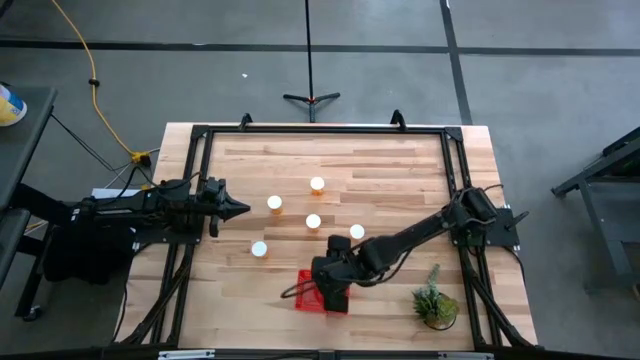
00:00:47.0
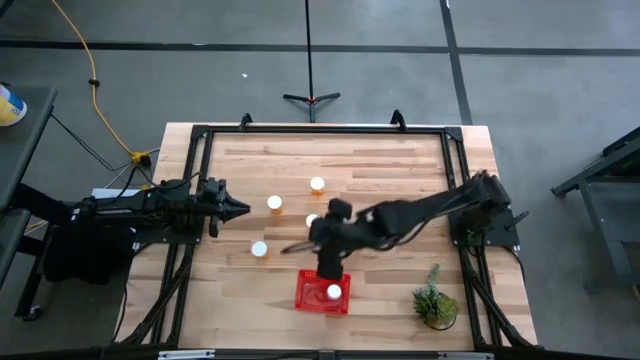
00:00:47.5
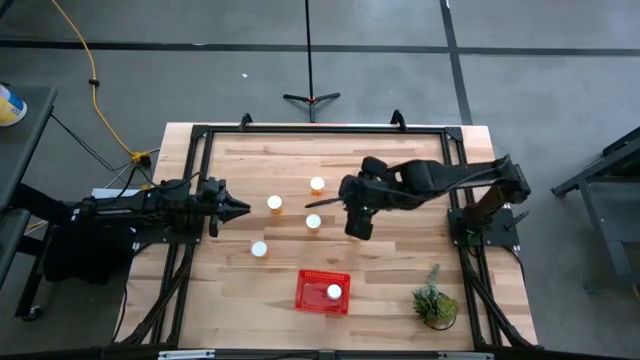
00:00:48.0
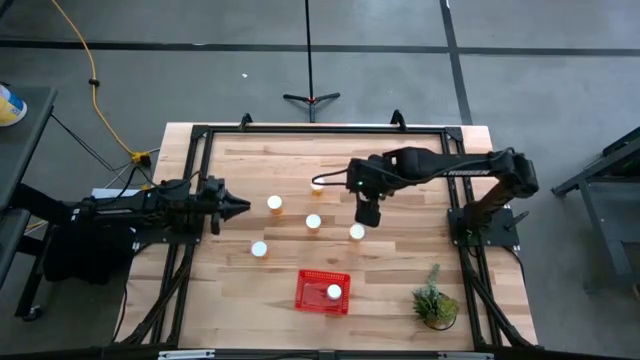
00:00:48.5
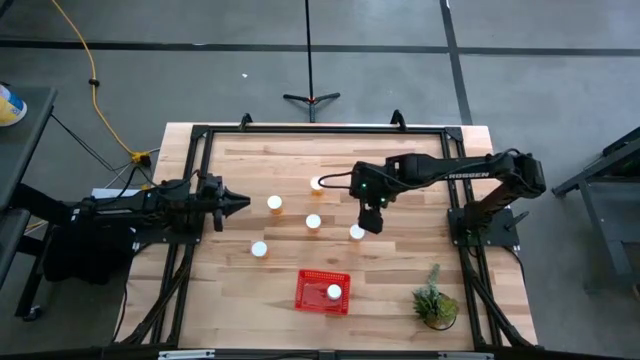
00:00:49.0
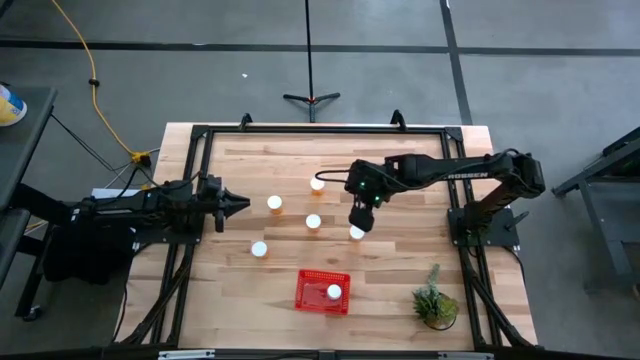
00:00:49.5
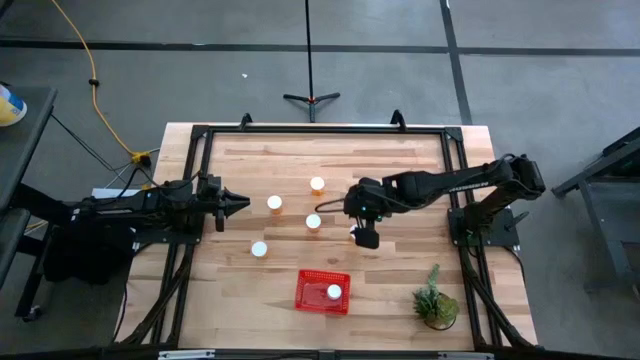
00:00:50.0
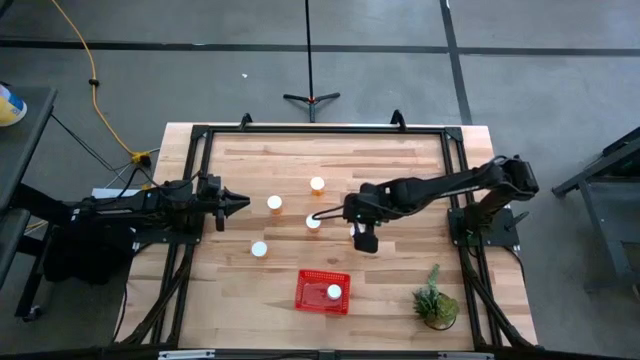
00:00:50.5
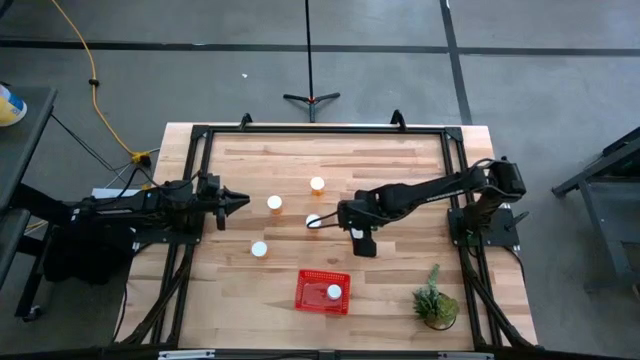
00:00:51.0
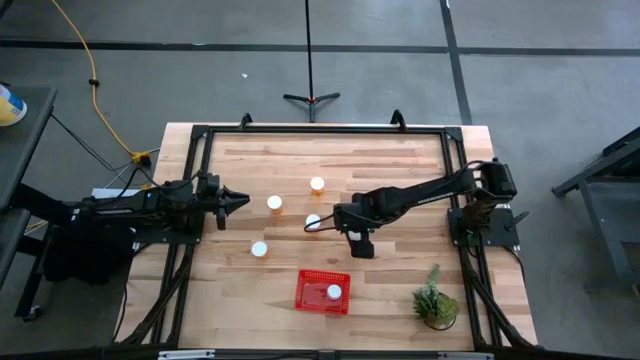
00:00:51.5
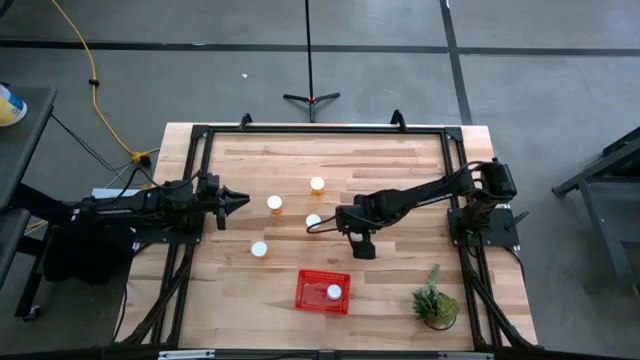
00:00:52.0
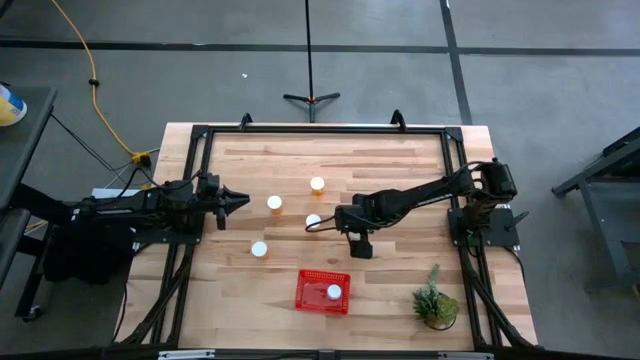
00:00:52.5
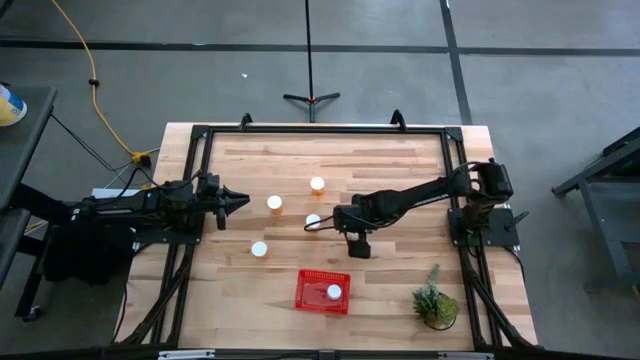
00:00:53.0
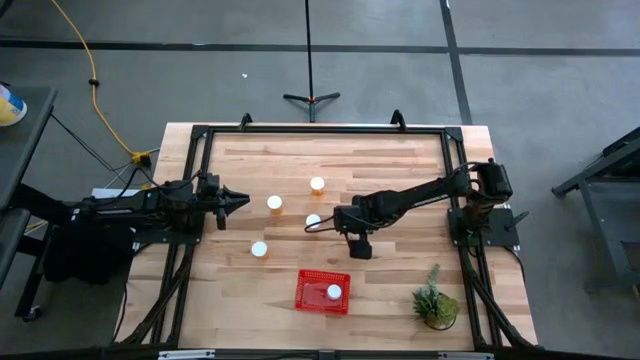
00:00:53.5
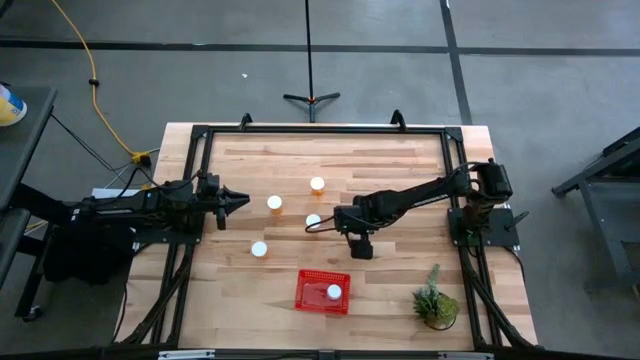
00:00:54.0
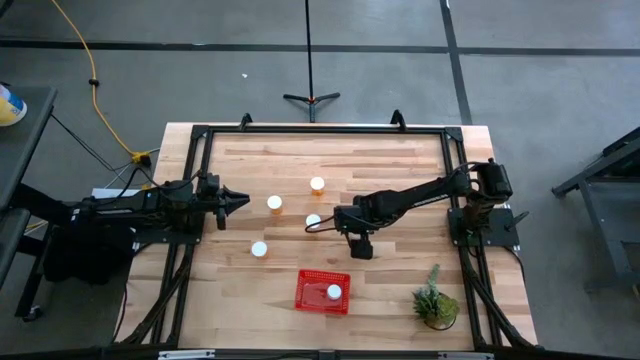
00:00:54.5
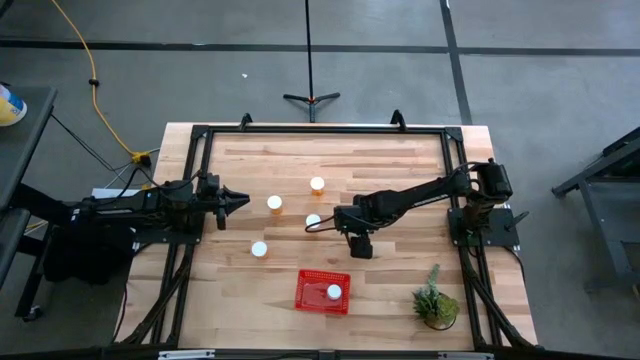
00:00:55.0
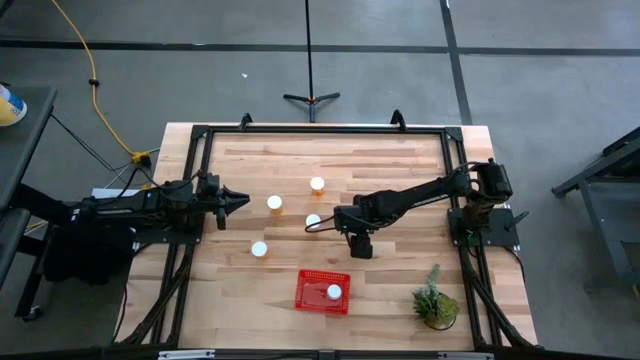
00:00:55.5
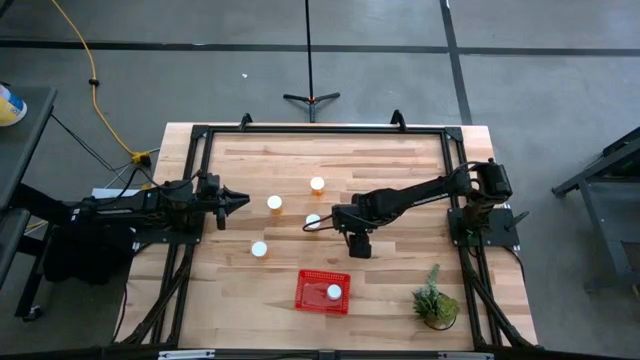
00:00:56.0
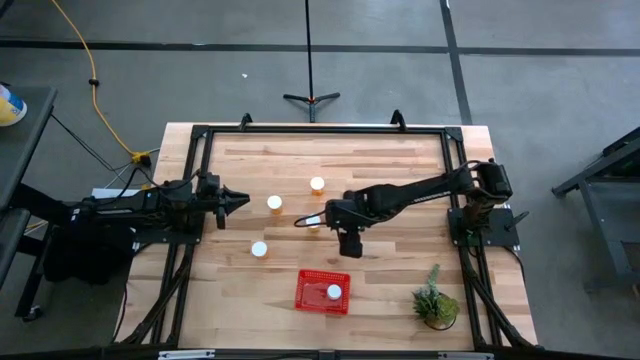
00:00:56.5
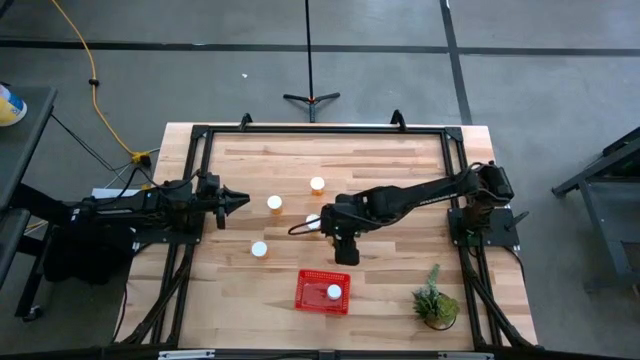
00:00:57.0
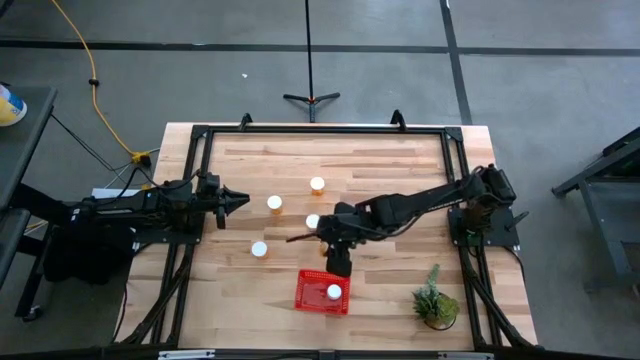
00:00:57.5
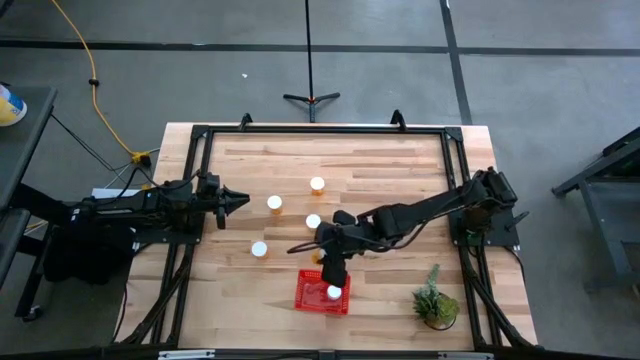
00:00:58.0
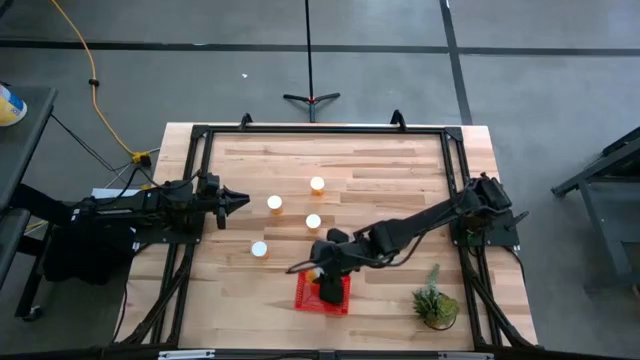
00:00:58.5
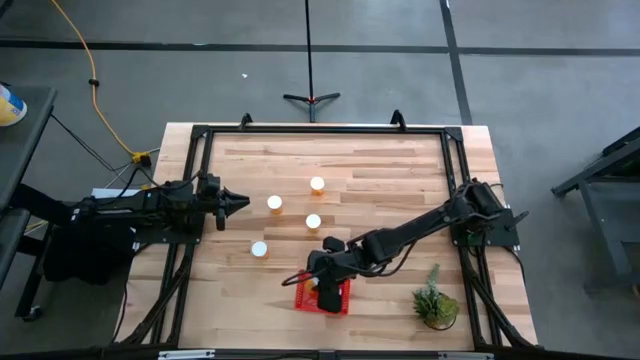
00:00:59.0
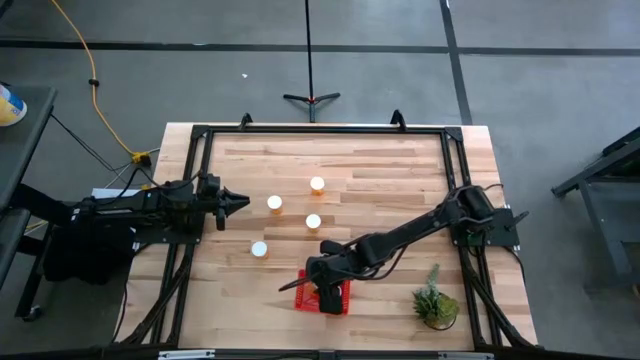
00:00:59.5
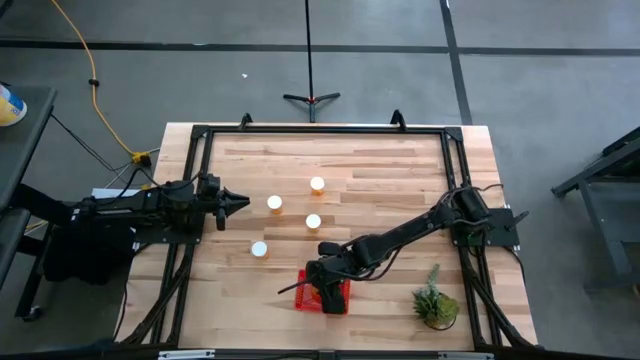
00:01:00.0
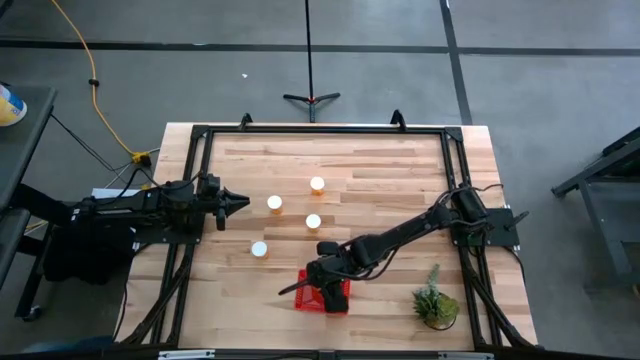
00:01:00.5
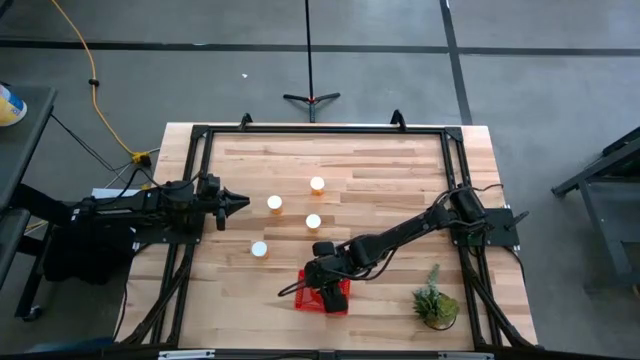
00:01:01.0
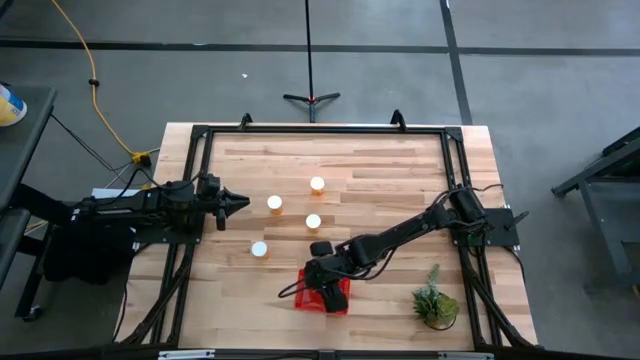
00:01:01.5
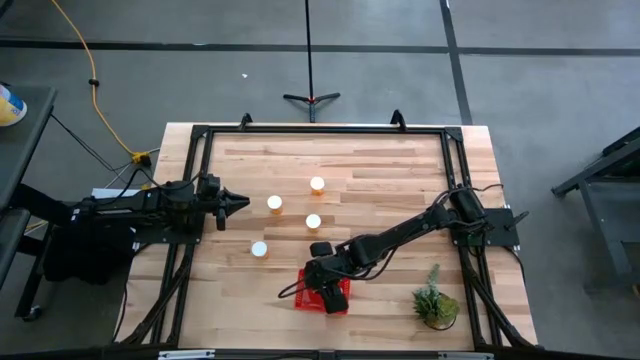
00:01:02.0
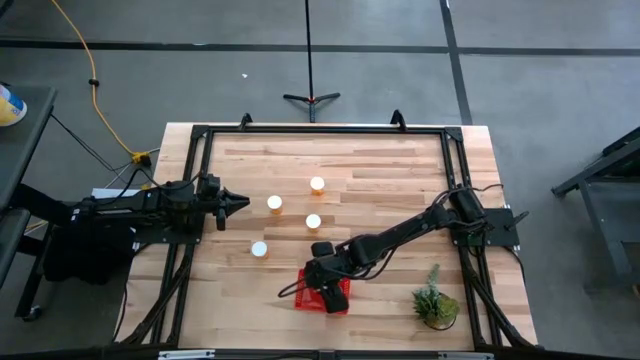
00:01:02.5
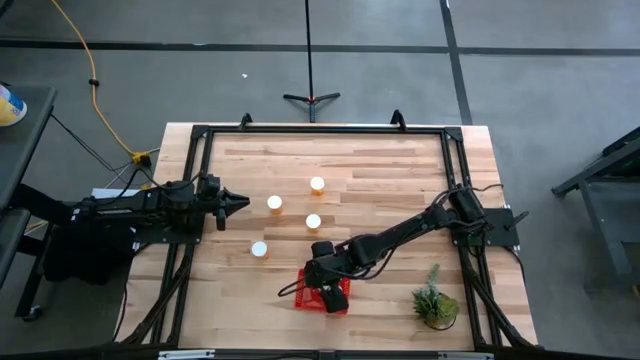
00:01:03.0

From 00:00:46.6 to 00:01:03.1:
Task: Pick and place pill bottles into a basket
Put the orange pill bottle into the red basket

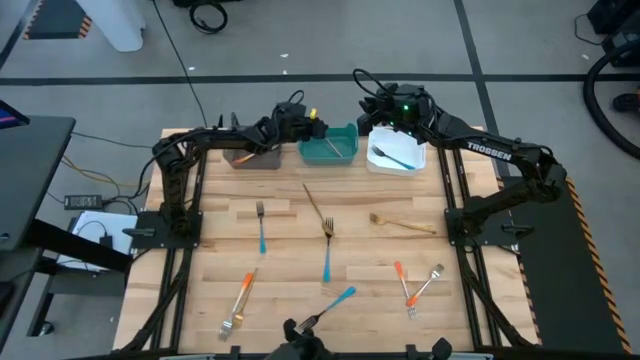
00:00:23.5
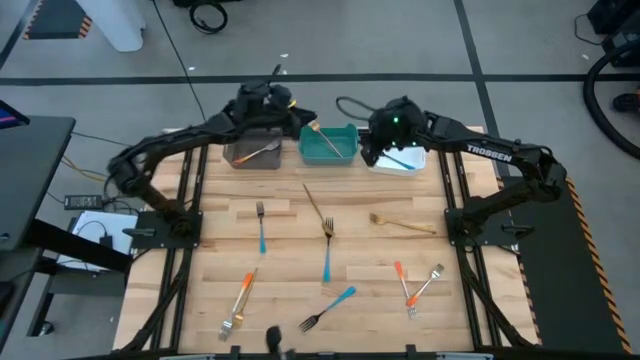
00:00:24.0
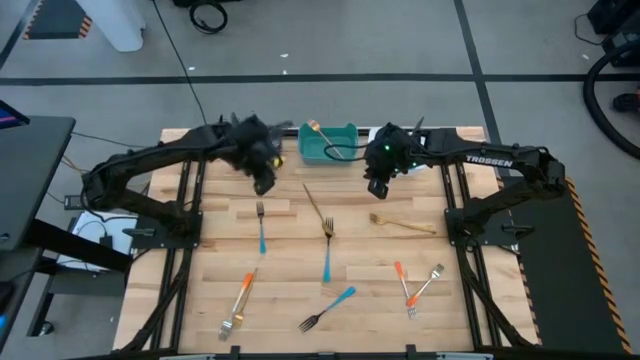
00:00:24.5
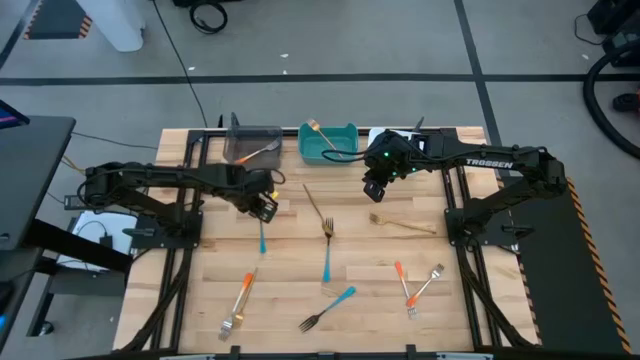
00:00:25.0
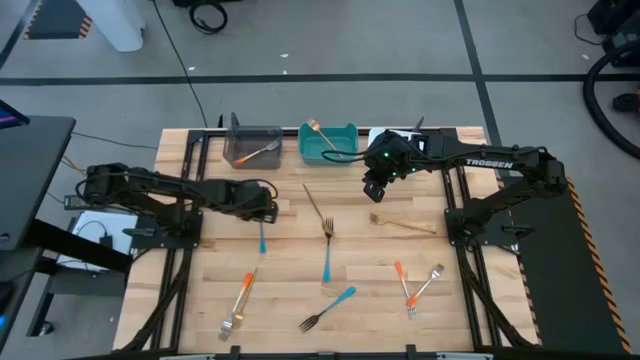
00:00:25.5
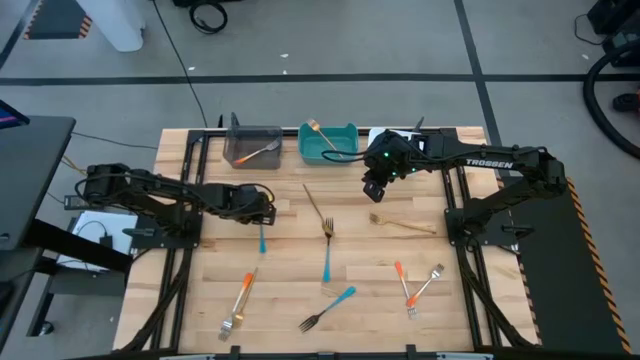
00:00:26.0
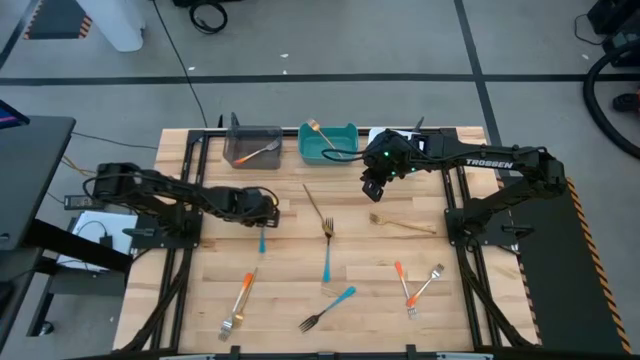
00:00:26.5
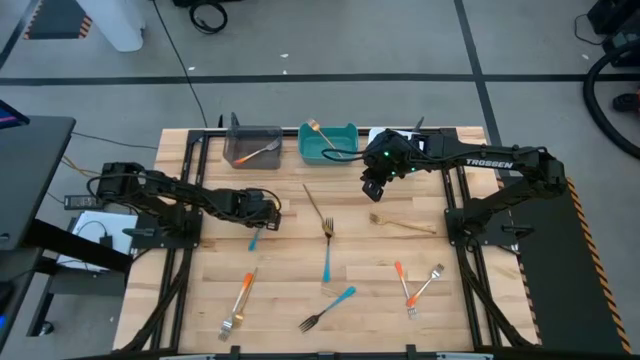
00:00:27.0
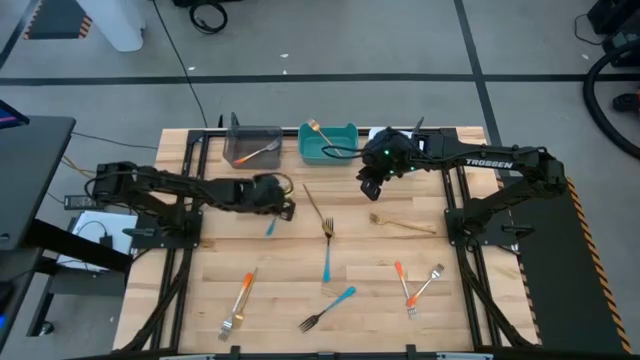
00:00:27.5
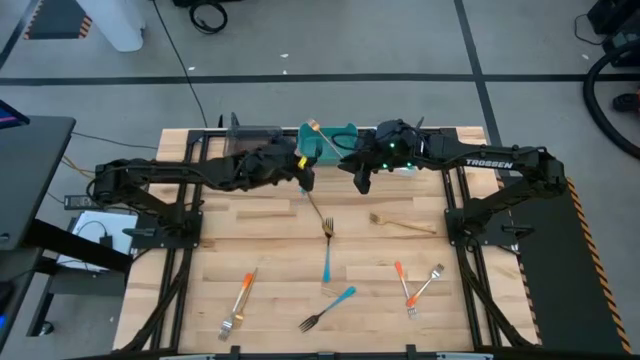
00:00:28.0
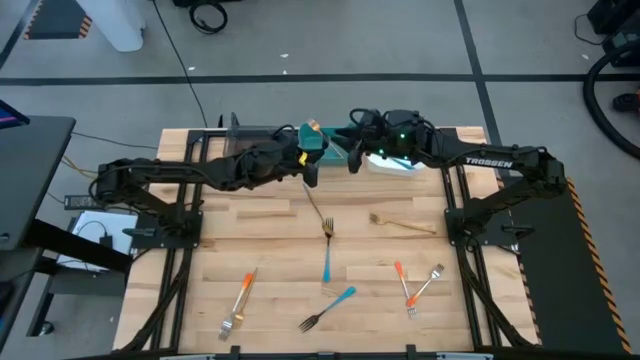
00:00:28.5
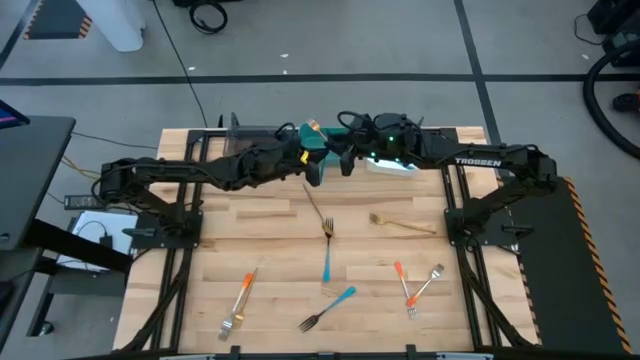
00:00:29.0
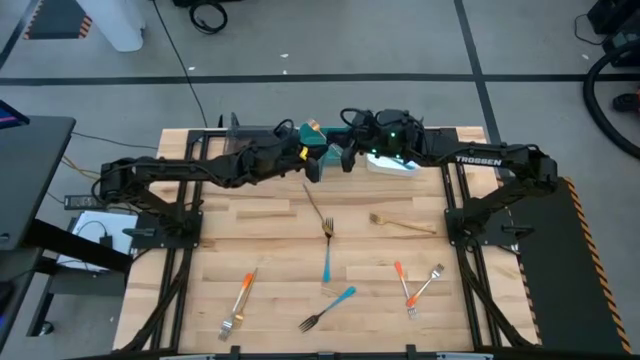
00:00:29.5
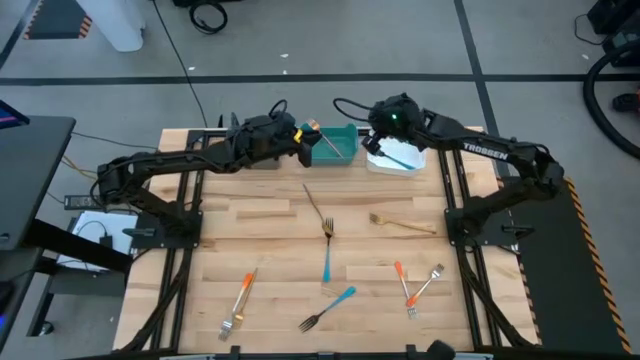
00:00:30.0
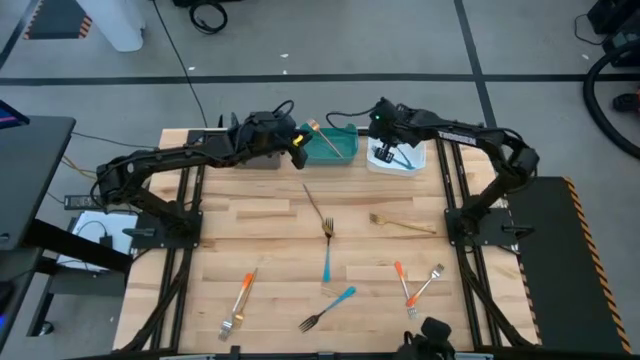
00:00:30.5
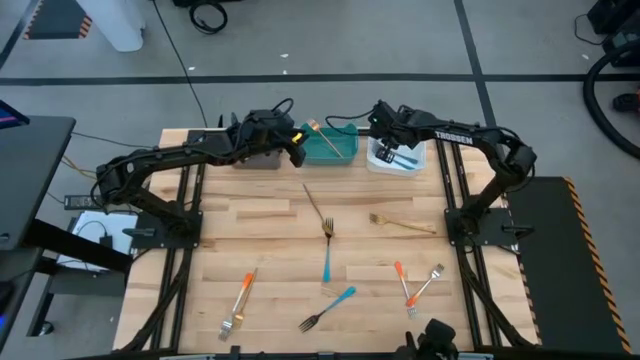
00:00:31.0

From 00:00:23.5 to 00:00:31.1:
Task: Sort silverware by color (type)
Put the top left blue fork into the white bin
